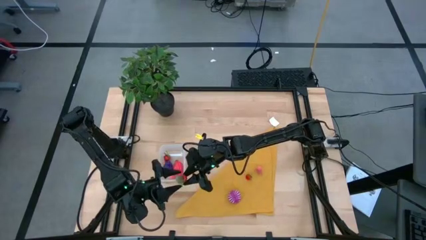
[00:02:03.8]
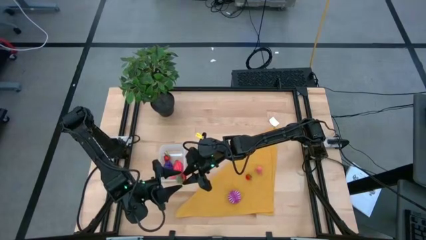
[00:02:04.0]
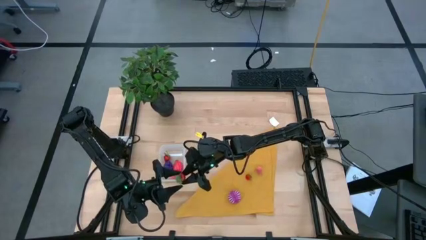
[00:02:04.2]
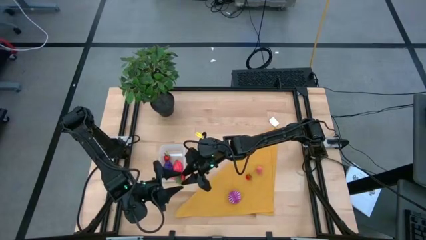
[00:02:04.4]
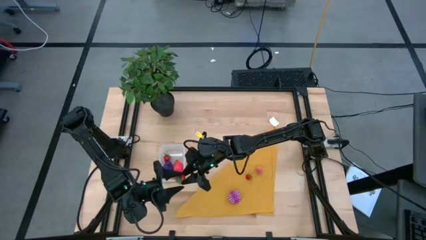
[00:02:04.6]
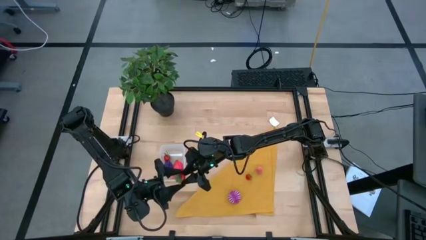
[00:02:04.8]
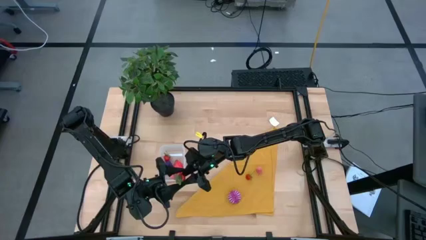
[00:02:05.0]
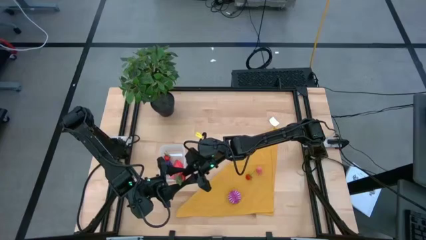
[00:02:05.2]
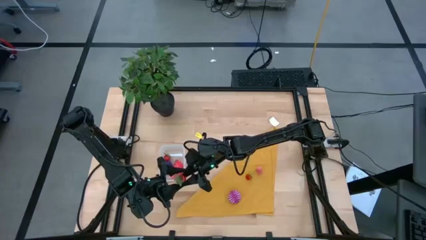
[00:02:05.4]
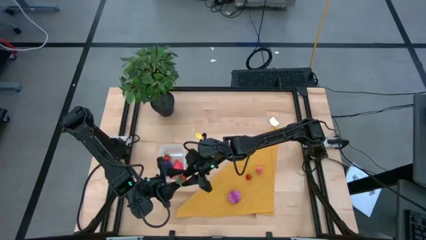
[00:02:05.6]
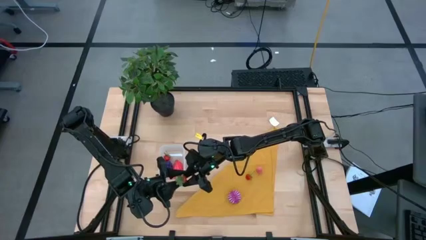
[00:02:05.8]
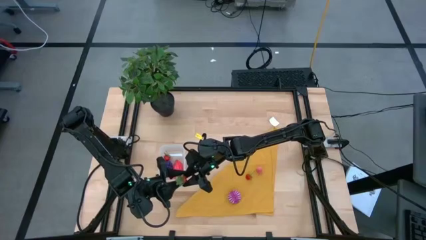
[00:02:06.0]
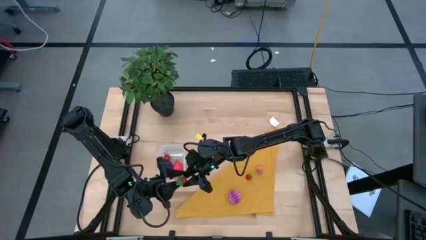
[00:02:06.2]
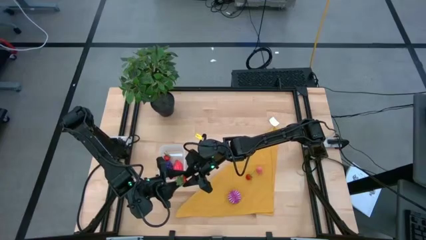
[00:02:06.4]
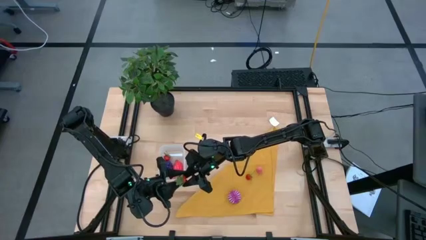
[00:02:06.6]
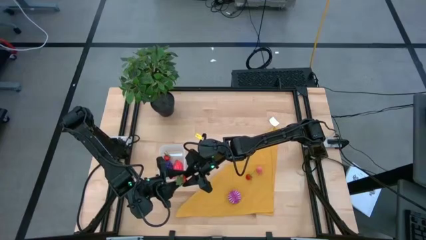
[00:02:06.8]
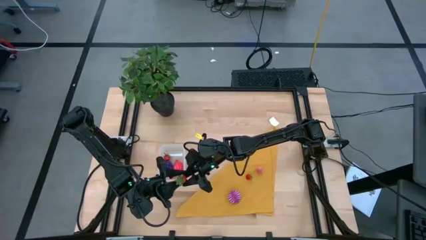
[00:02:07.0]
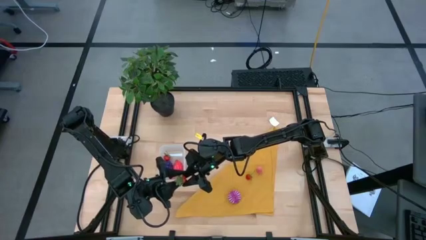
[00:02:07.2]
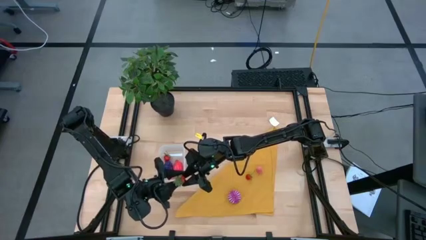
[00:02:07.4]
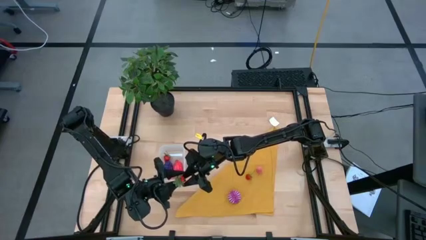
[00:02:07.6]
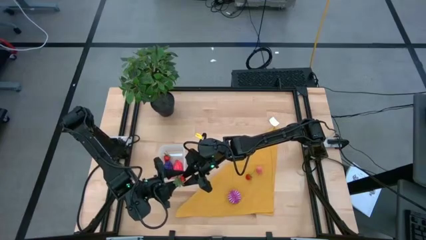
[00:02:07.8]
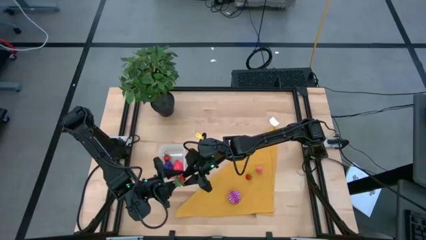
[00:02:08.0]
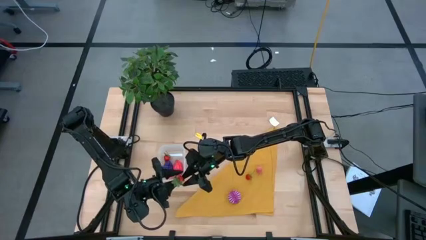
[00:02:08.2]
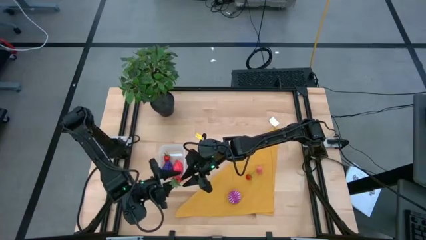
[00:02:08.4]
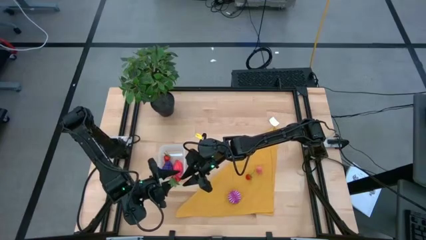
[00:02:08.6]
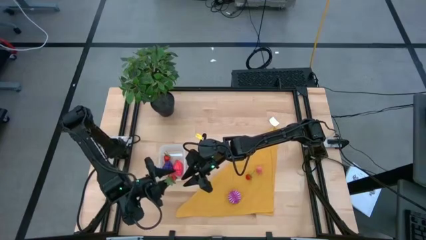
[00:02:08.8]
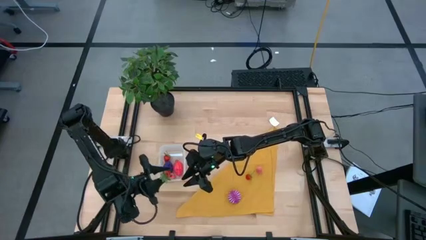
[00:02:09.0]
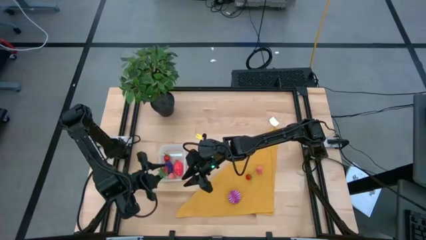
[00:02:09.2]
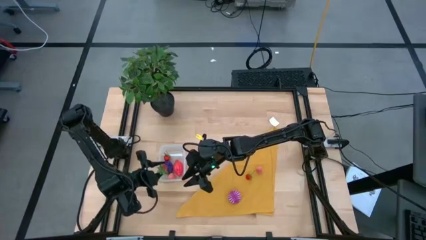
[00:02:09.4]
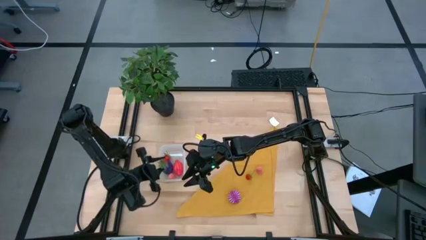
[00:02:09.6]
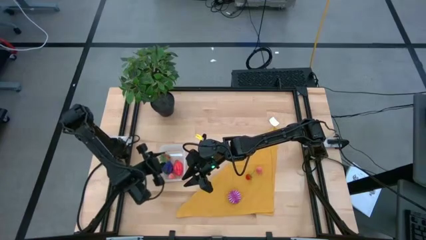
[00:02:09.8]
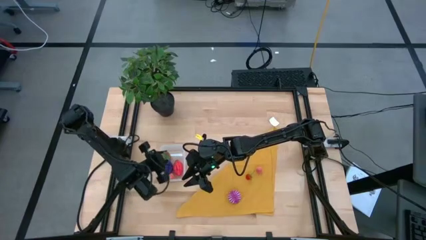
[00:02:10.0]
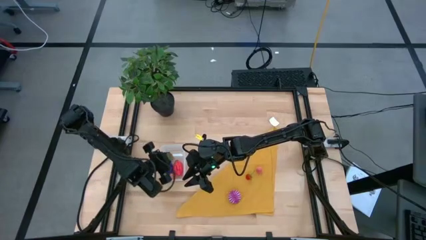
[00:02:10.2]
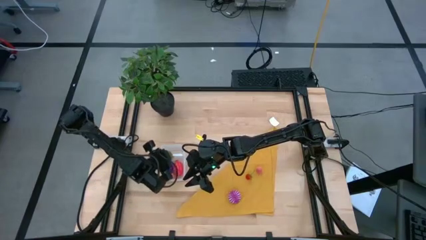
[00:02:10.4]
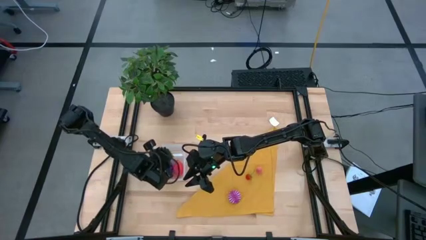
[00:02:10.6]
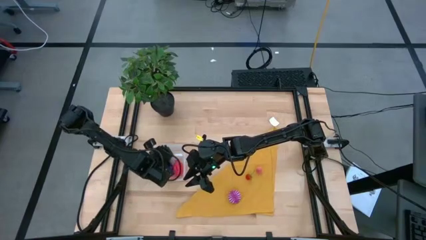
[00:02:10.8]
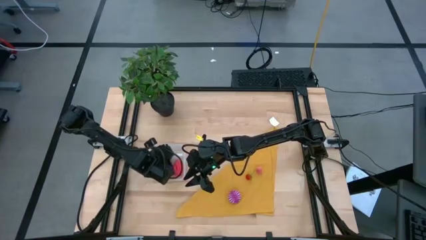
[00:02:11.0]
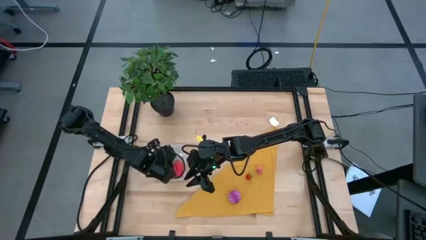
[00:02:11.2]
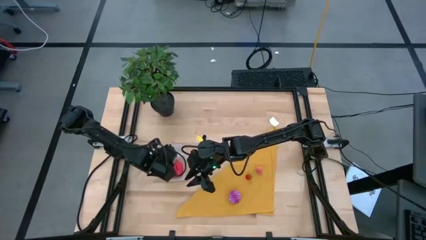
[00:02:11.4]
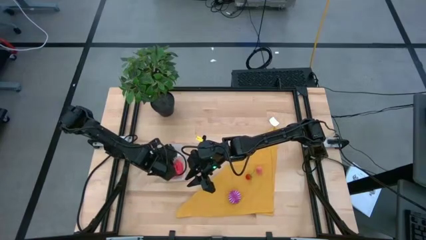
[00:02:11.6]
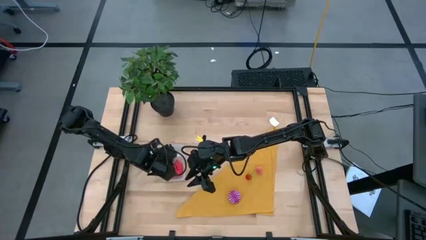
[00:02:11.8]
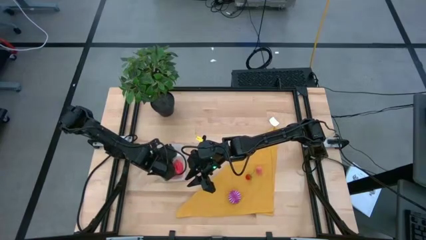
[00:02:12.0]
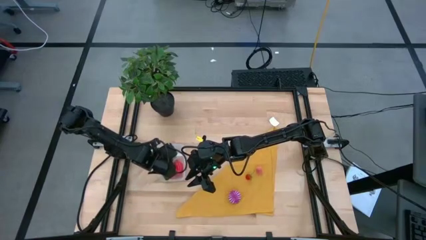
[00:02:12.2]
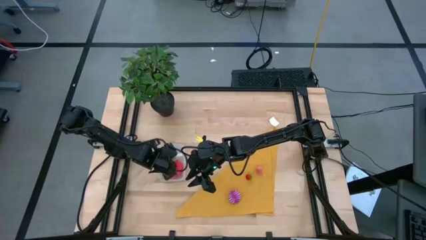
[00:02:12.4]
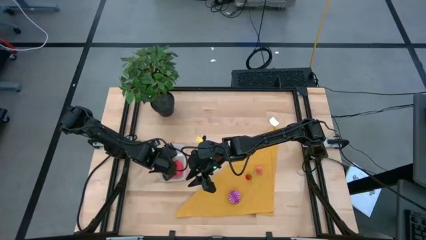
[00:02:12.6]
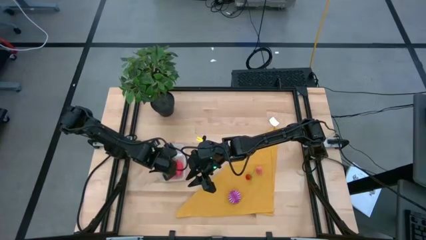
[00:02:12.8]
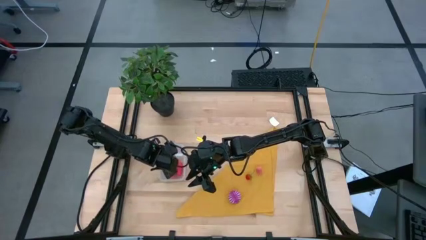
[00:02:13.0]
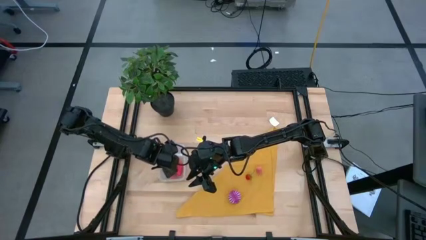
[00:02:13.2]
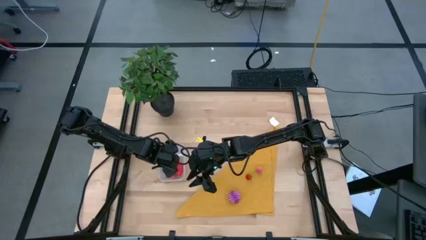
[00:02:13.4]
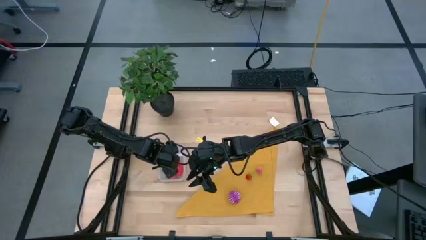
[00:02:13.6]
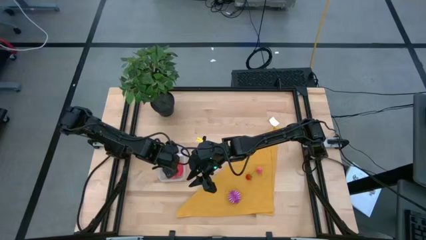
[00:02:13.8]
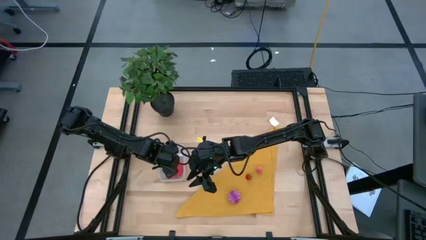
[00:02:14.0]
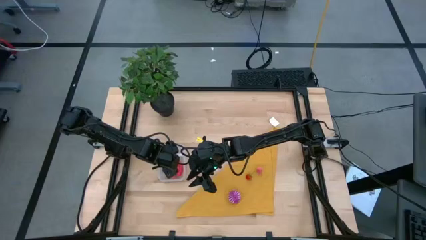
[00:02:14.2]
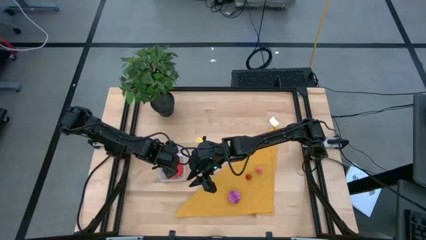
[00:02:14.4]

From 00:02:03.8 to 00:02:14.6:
Task: Pick and placing Produce into tupperware
Put the left red strawberry into the transparent bin

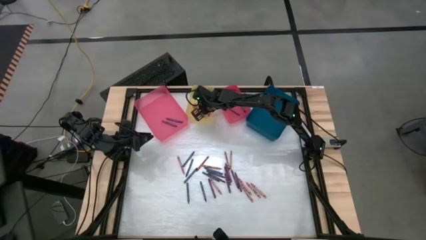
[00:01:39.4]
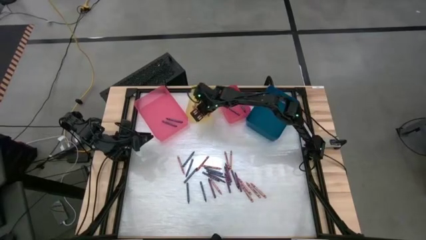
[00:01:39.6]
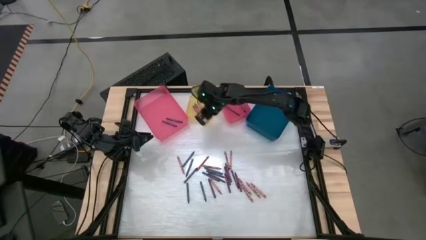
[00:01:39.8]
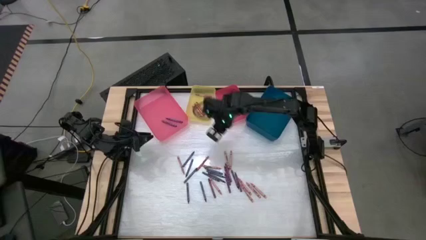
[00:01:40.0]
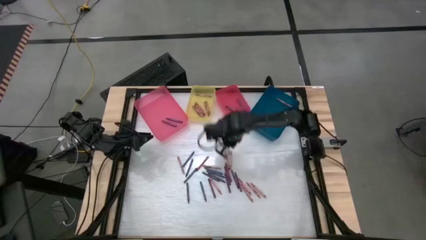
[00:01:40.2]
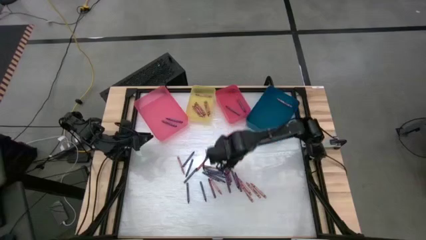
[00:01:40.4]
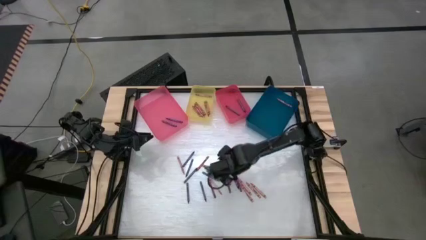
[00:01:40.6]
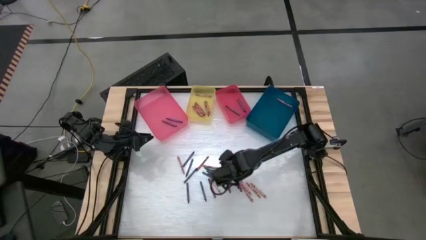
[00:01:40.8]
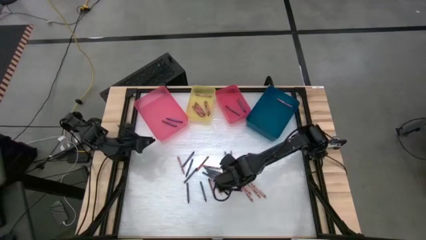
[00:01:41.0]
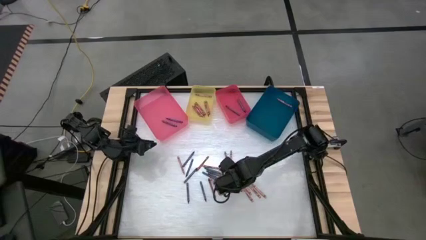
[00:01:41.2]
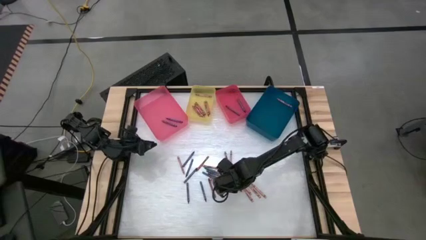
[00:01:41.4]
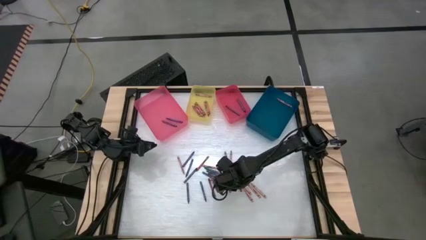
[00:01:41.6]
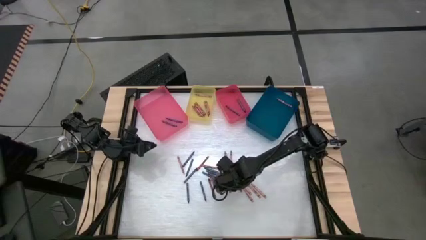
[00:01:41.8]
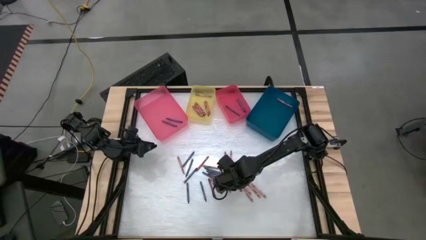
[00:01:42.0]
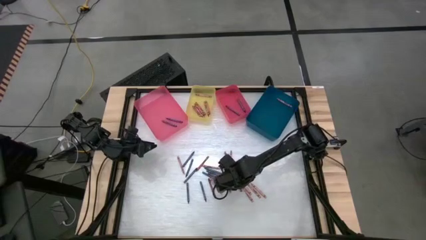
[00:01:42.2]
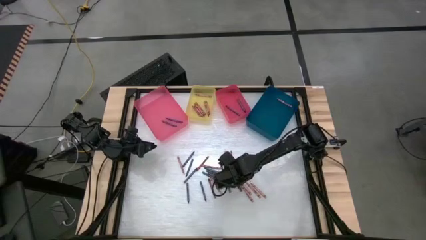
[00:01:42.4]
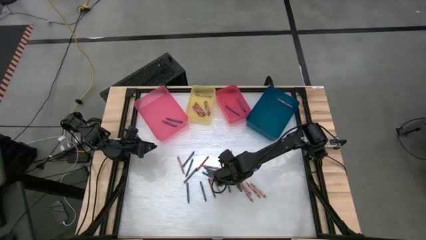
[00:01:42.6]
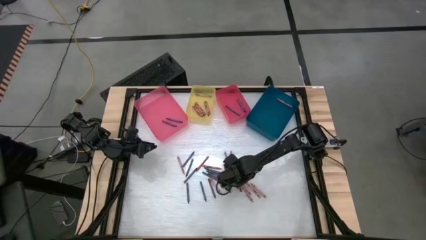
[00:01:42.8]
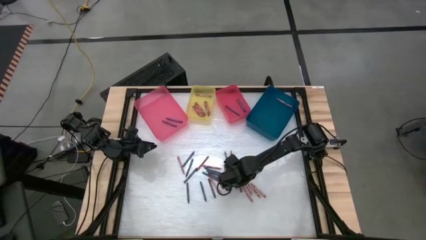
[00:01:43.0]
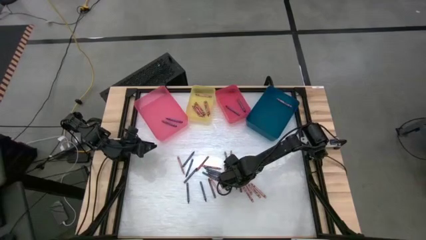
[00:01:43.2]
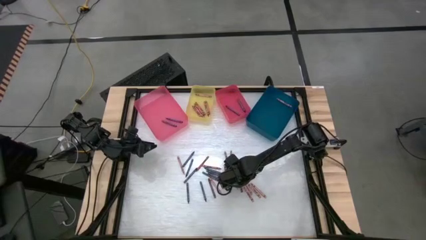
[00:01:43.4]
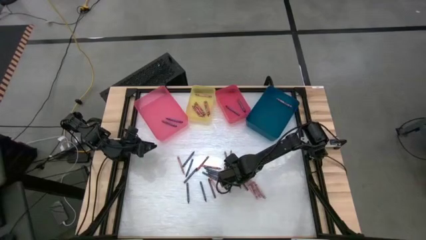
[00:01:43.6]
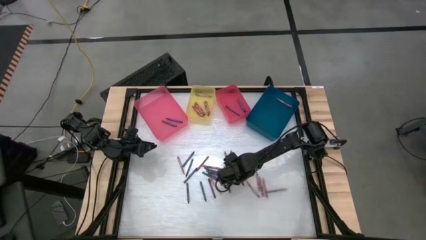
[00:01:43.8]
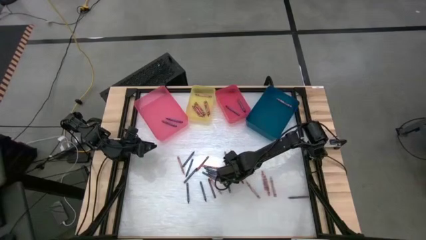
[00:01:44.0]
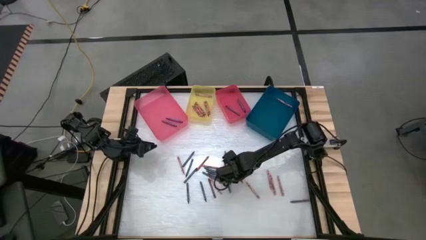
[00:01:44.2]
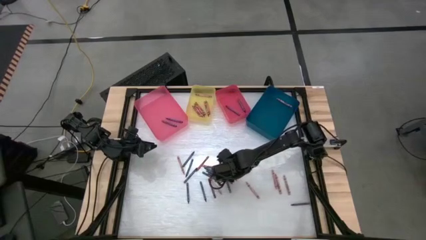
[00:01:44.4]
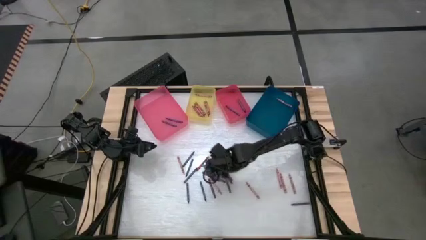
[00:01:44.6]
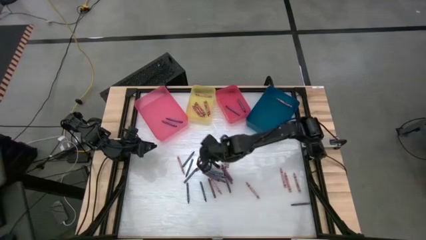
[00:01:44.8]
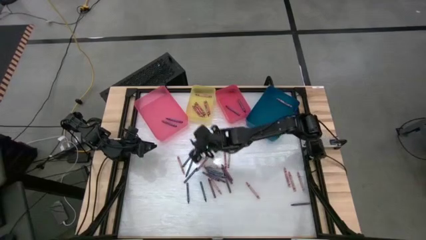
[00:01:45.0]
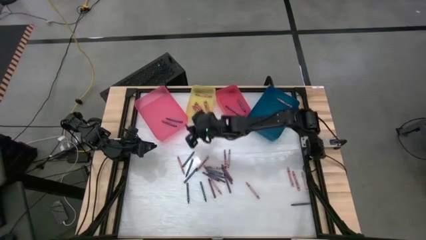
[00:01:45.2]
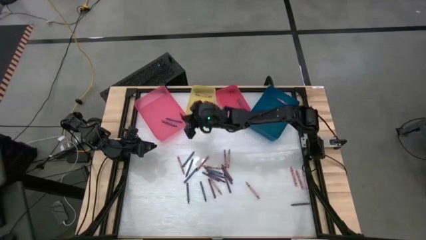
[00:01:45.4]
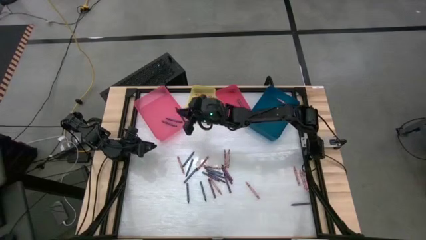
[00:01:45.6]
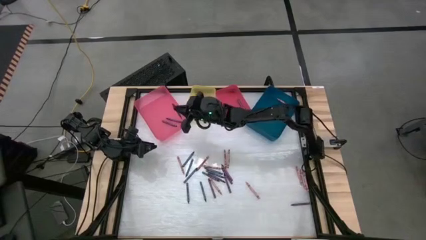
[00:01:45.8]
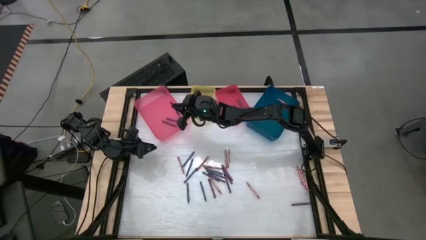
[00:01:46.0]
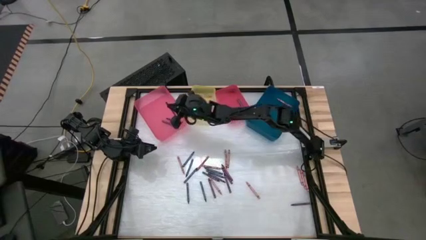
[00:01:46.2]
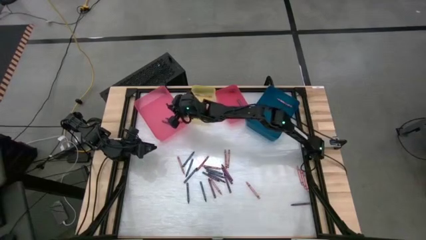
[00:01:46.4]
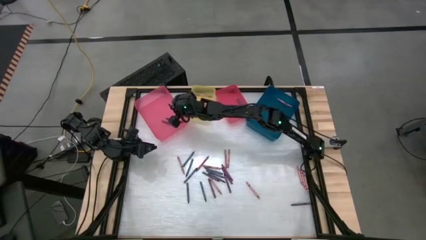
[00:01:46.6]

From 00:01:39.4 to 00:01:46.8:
Task: Sort crayons
Put the violet crayon into the pink bin
